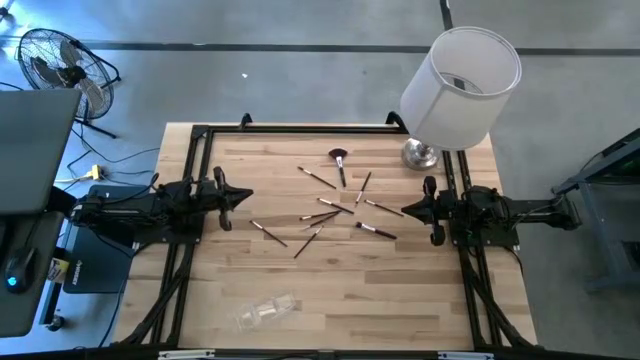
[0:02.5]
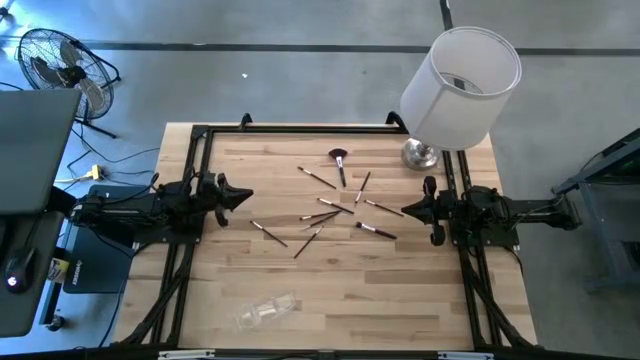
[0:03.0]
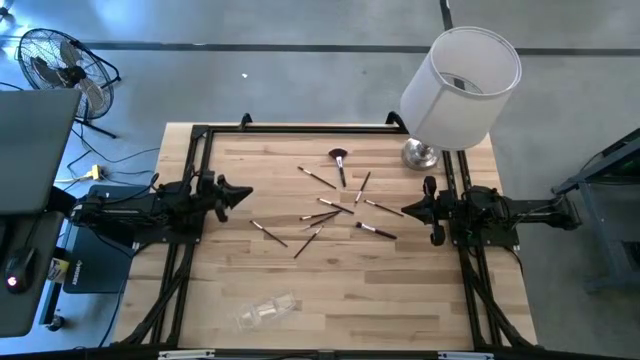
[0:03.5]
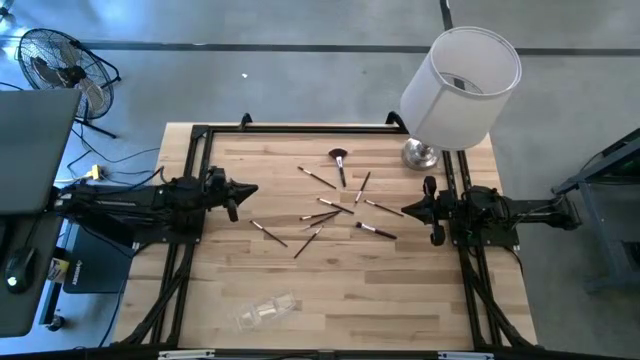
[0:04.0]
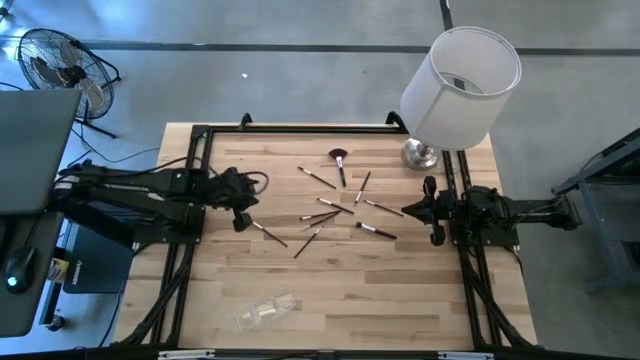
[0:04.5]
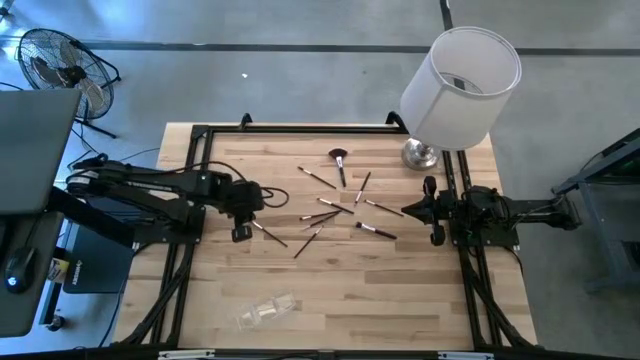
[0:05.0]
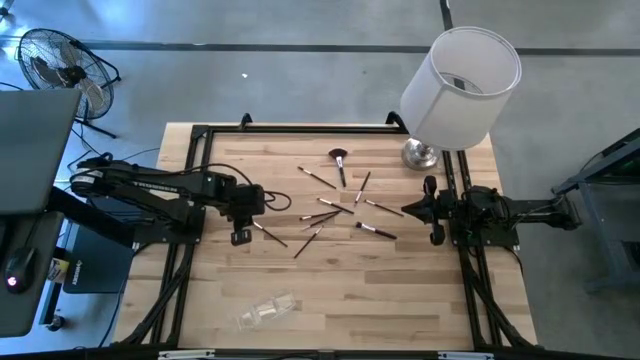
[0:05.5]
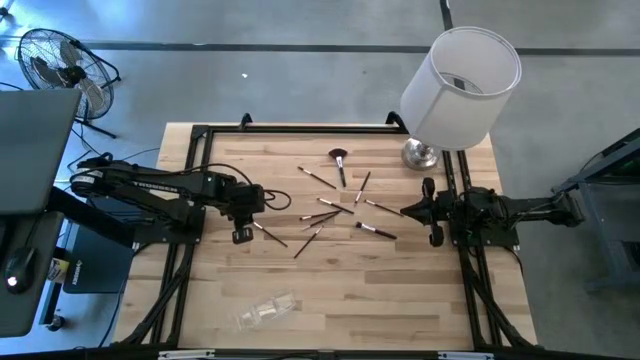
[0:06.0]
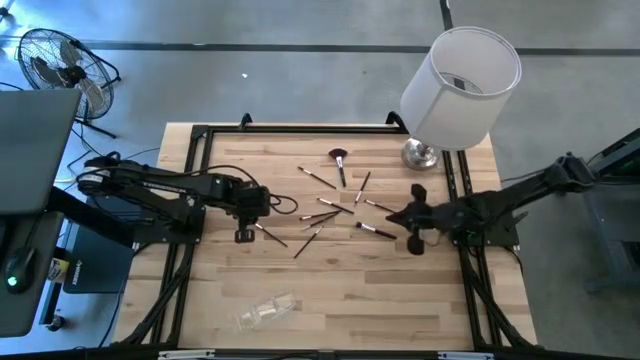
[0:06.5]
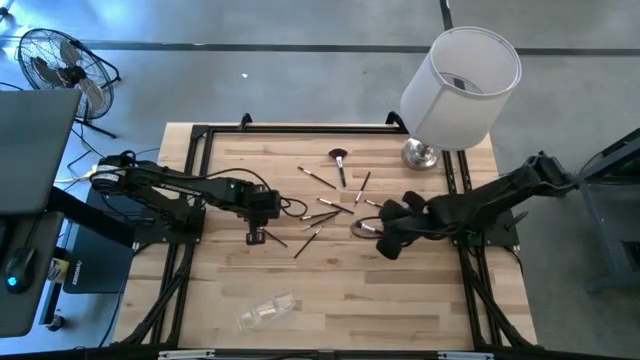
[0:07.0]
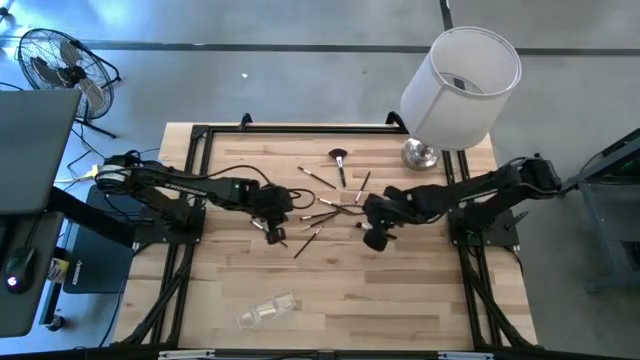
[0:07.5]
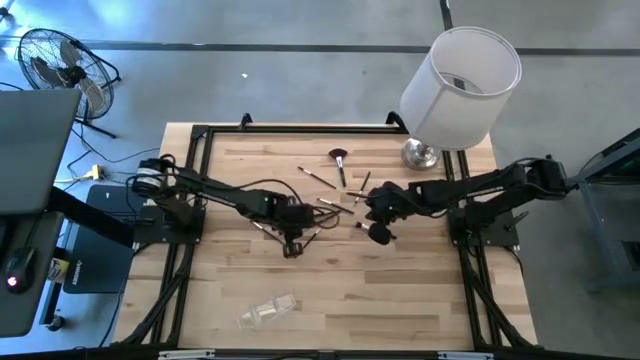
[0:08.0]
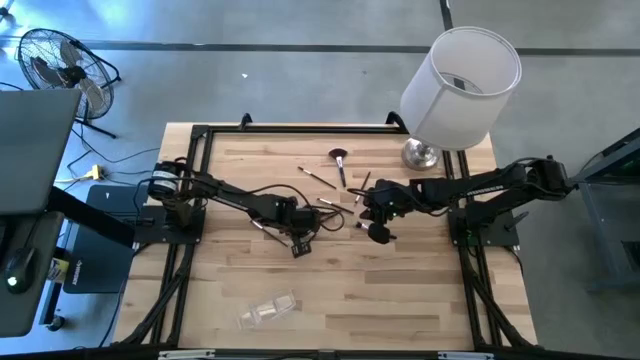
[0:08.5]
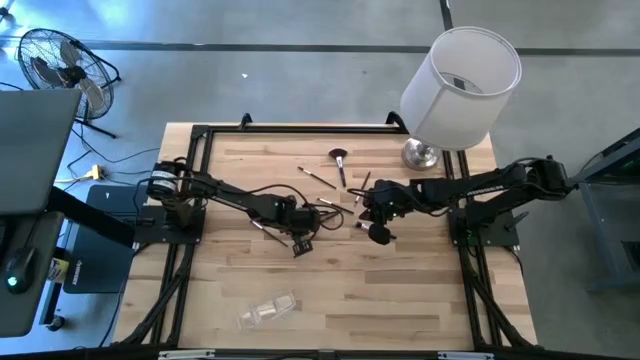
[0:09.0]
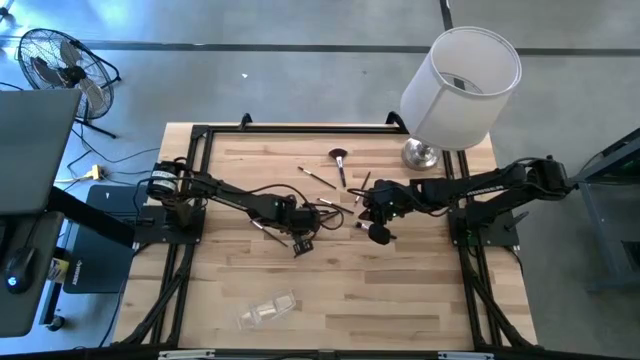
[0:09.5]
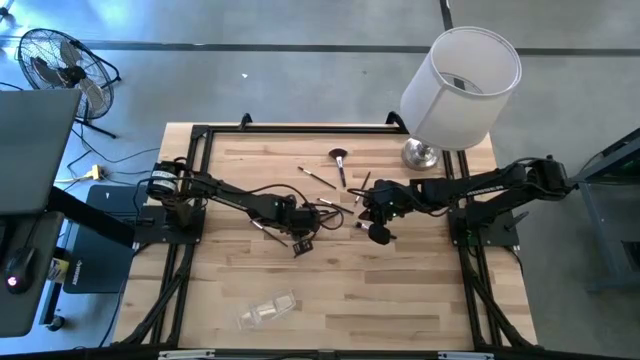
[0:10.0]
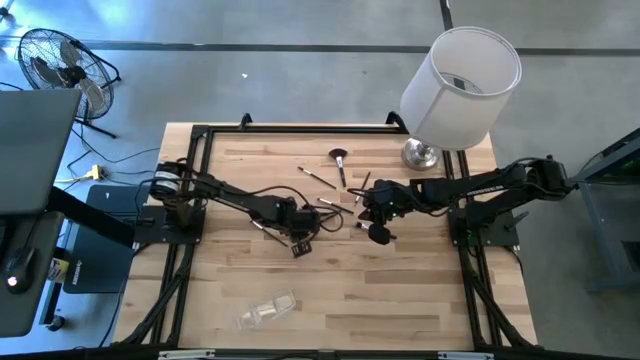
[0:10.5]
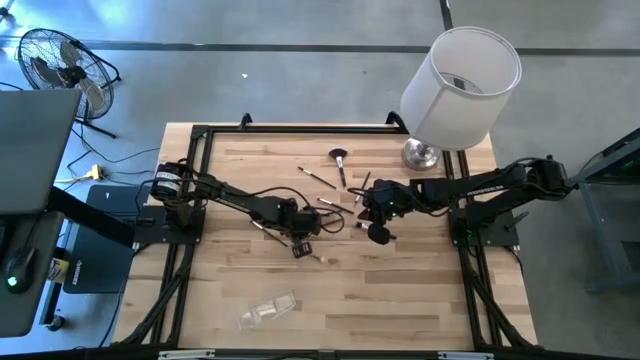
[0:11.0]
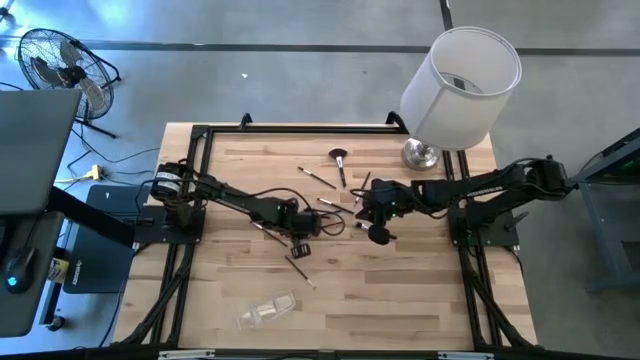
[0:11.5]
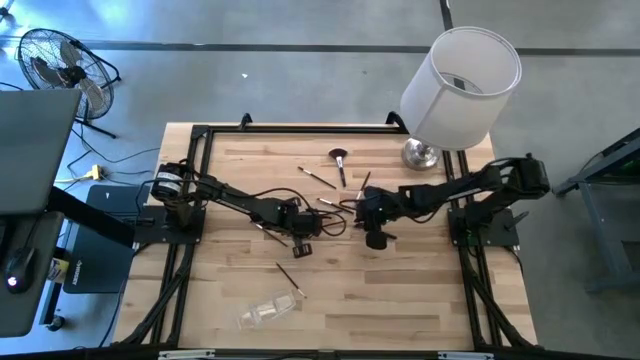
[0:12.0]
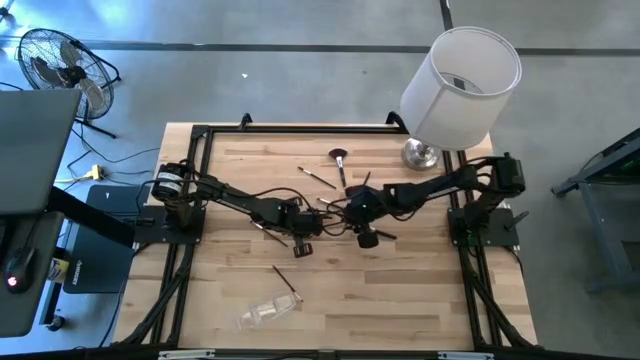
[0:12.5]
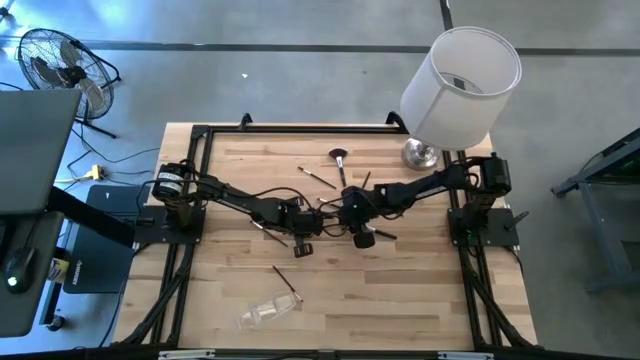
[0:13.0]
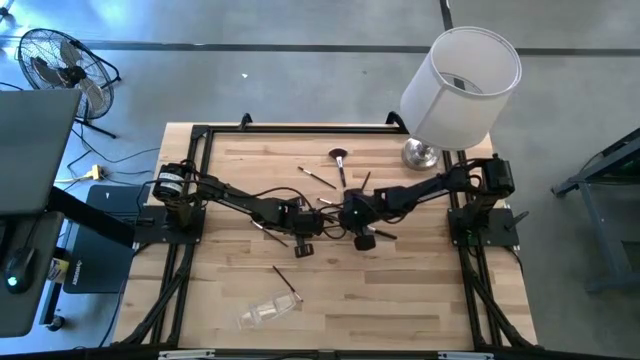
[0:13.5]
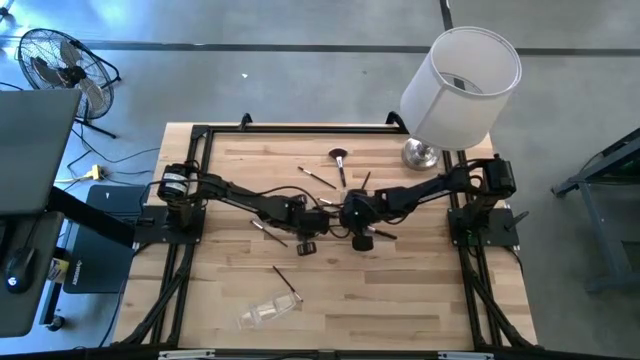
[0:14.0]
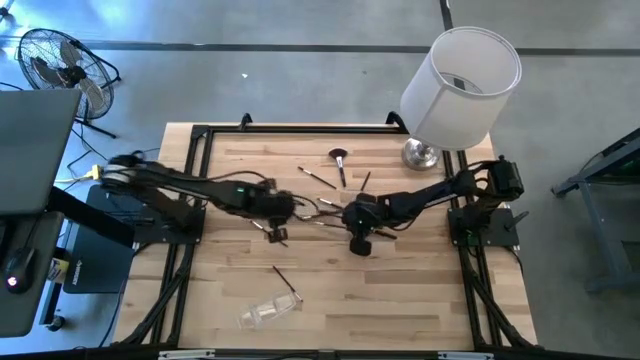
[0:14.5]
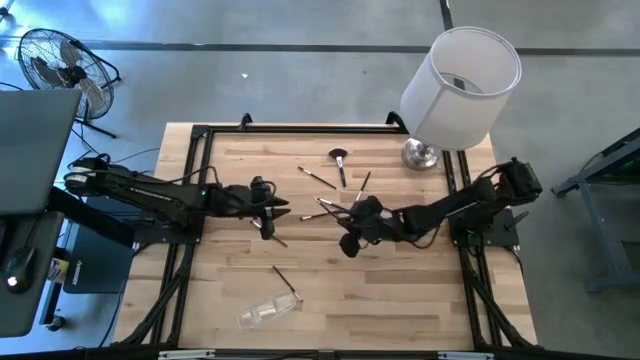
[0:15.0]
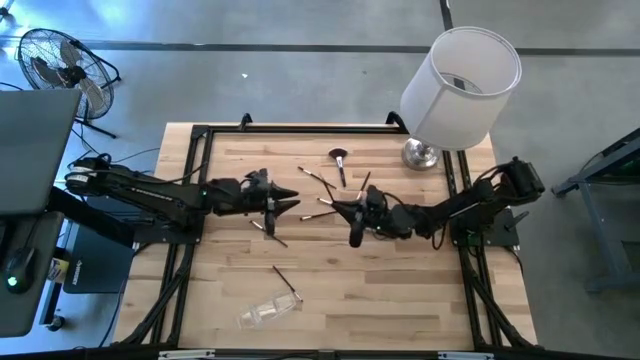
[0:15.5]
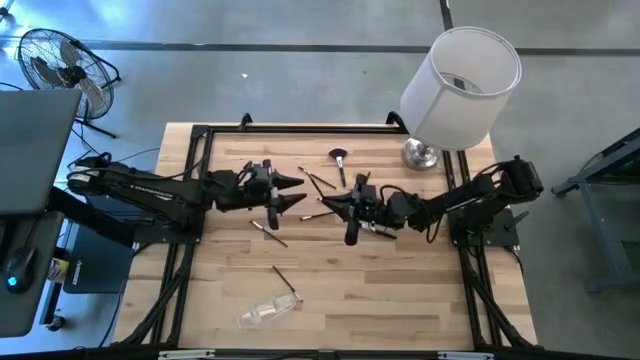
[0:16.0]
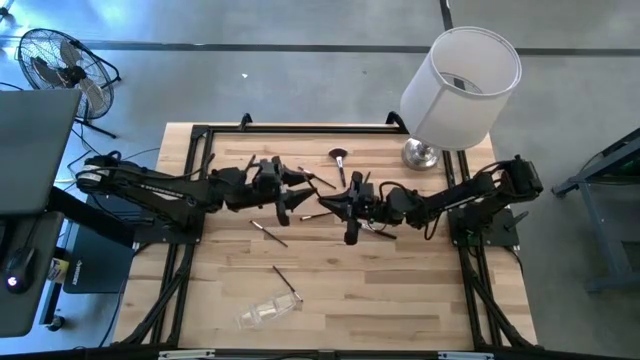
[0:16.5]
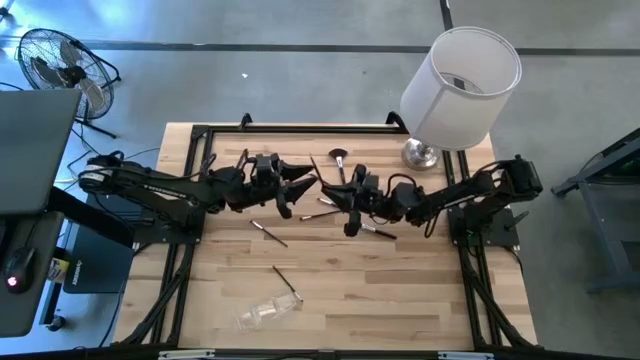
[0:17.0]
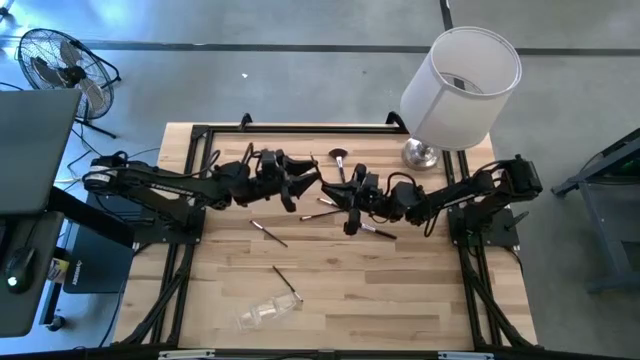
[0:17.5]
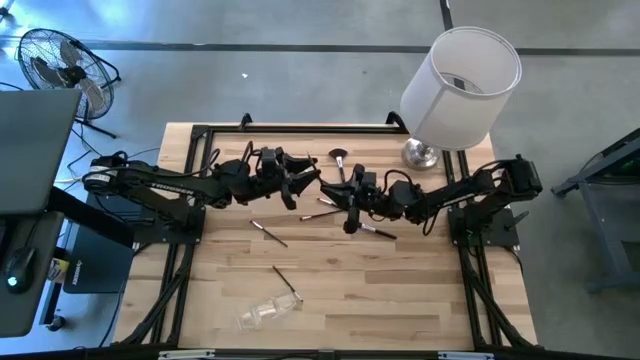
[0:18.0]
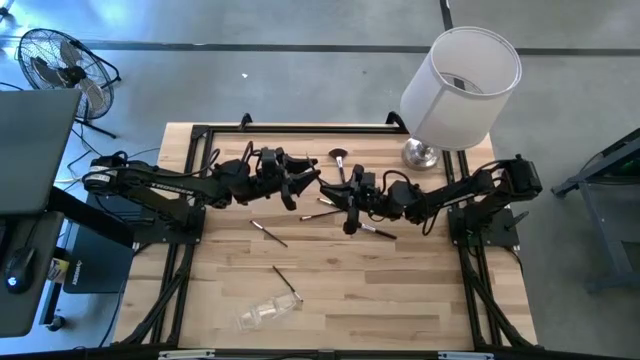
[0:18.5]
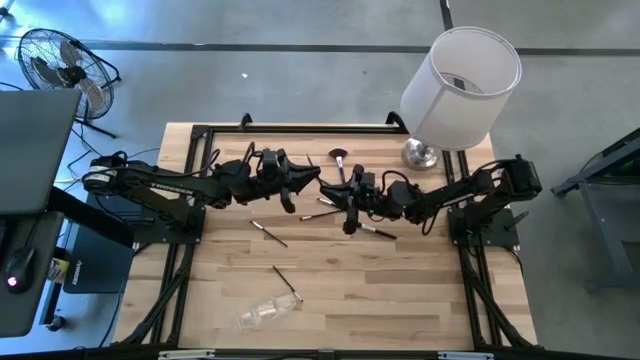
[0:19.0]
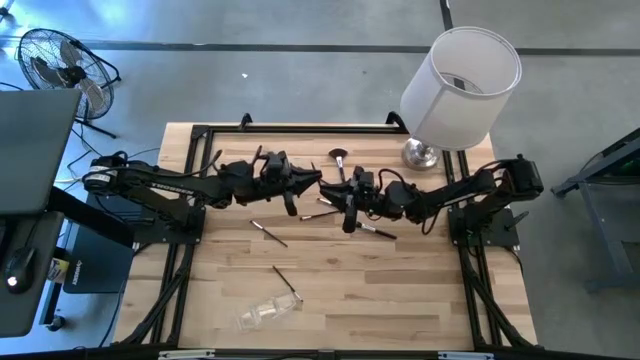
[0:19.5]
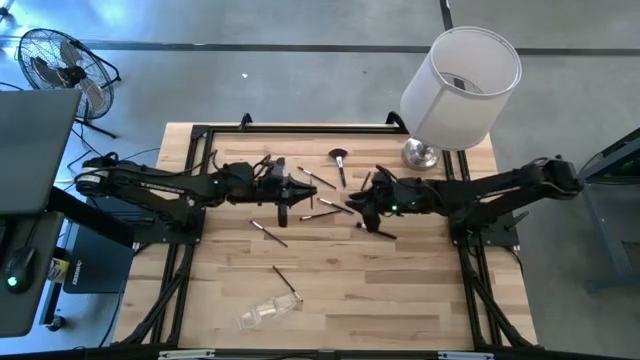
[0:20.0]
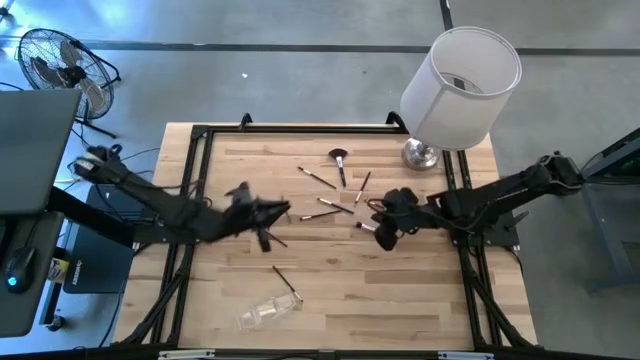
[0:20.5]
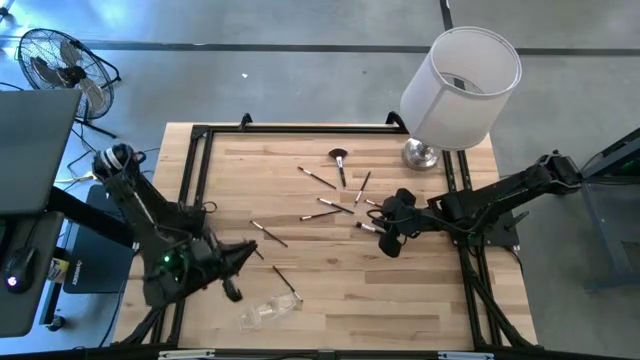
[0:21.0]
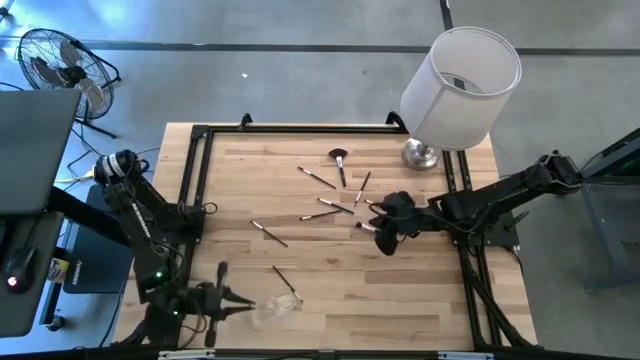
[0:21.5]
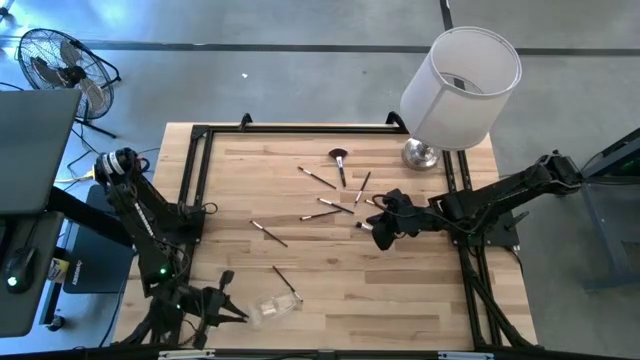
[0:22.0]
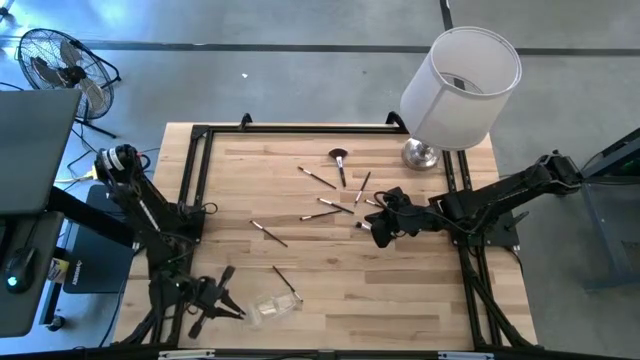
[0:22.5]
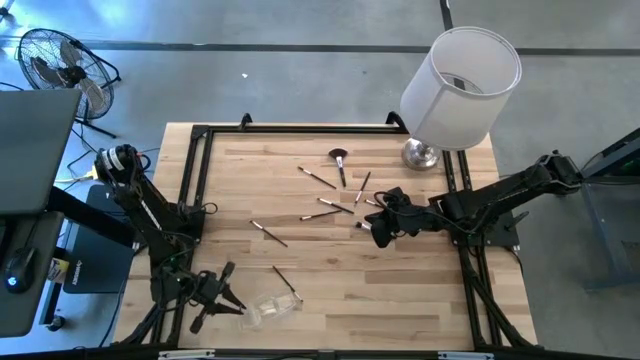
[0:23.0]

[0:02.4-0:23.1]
Task: Pick & Place Makeup Supplies
Put the silver makeup brush into the transparent organizer
